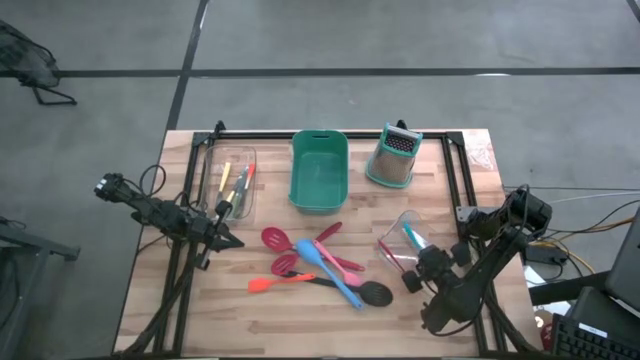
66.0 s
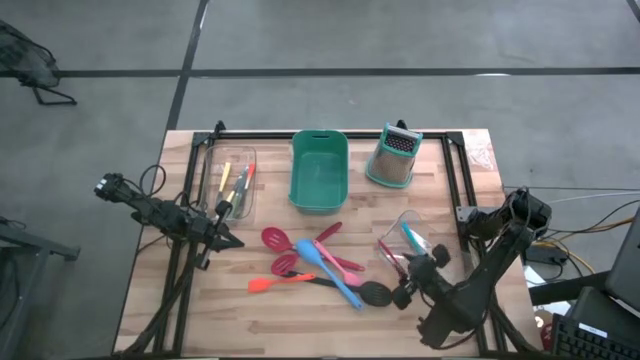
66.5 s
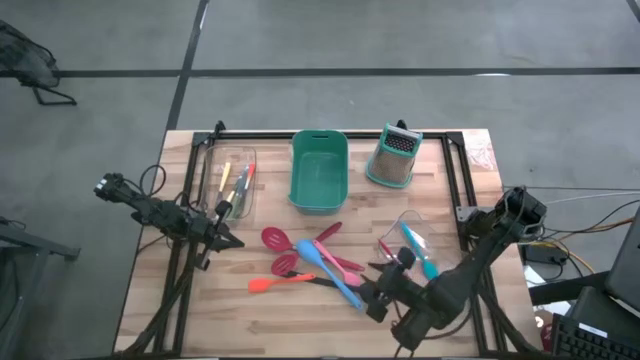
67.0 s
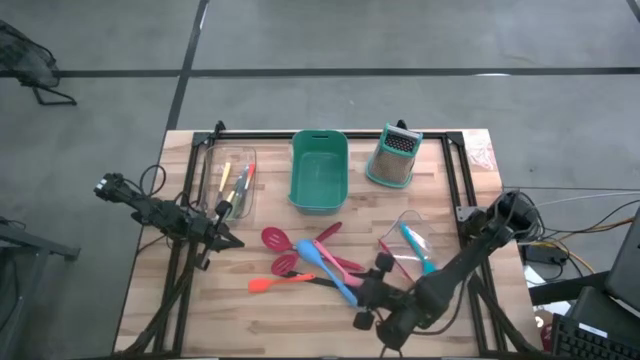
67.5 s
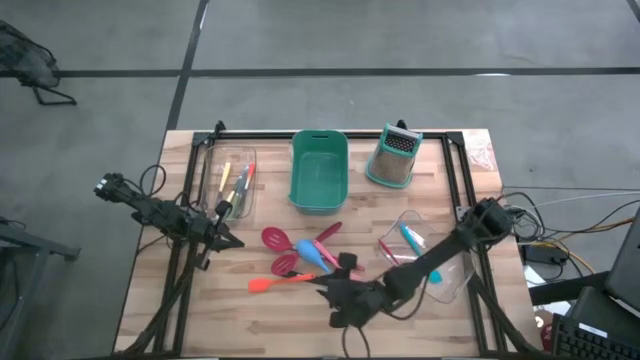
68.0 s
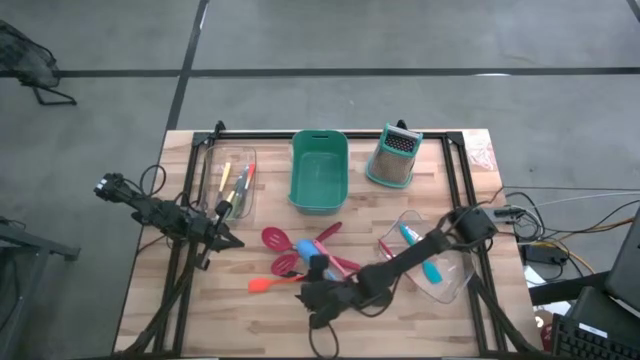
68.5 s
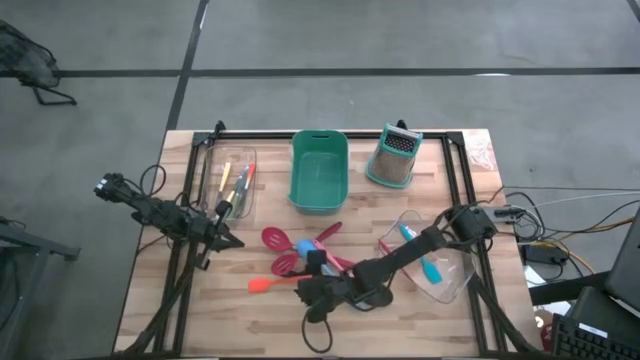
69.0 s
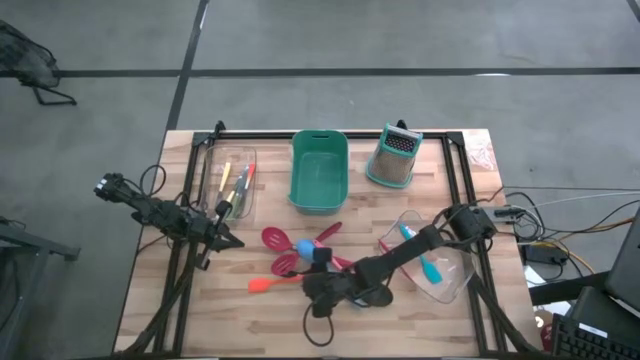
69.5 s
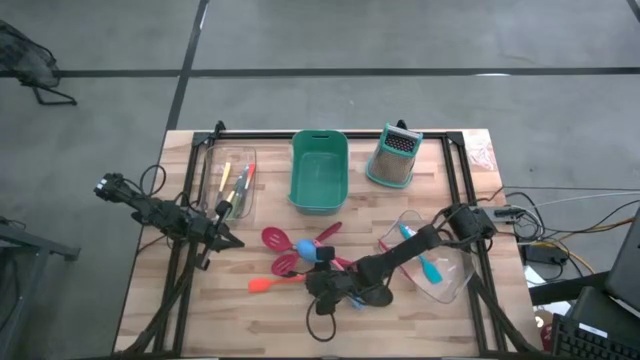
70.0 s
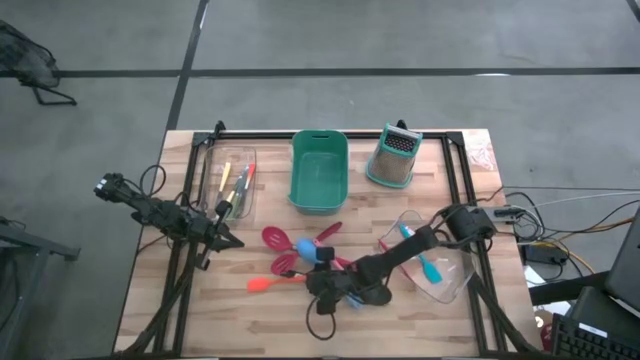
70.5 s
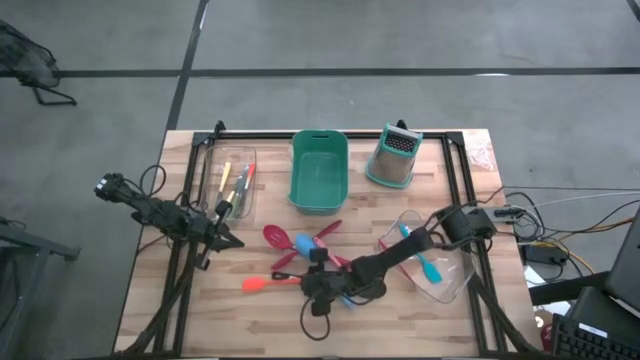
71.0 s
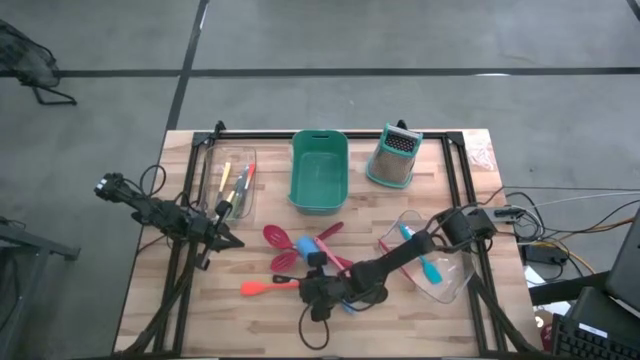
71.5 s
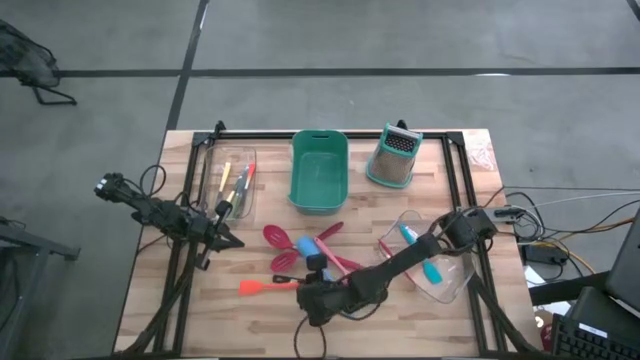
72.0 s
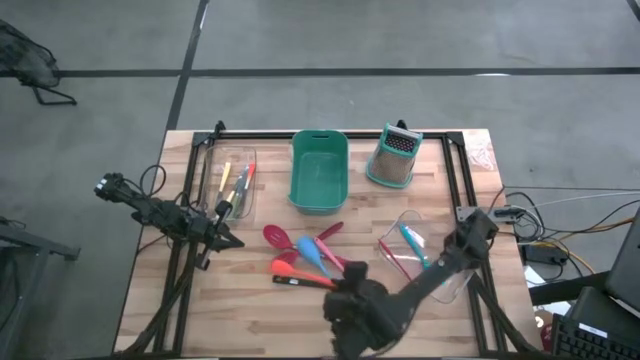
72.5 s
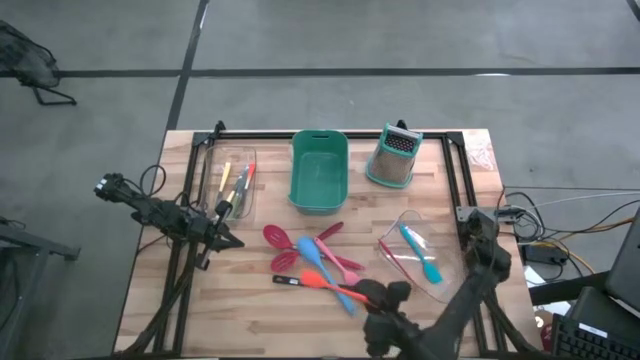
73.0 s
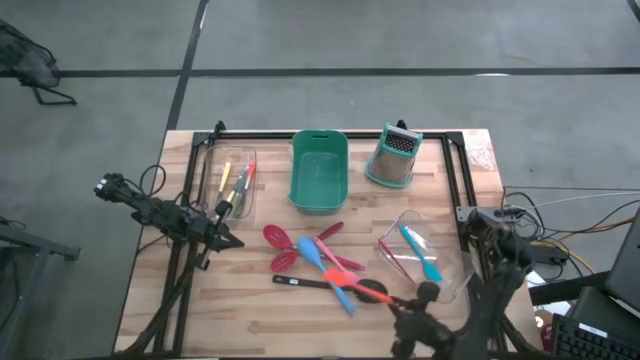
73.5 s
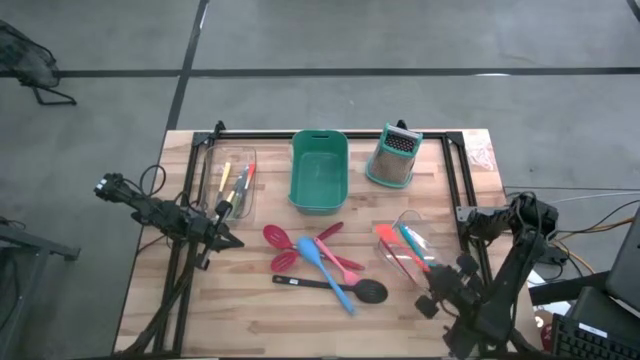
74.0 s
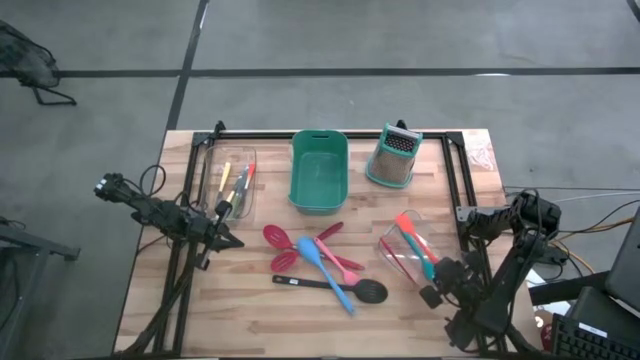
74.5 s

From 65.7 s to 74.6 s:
Task: Pick & Place Kitchen Items
Put the orange spatula into the bottom transparent bin

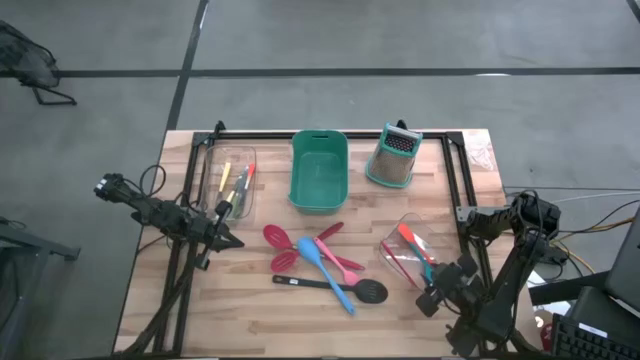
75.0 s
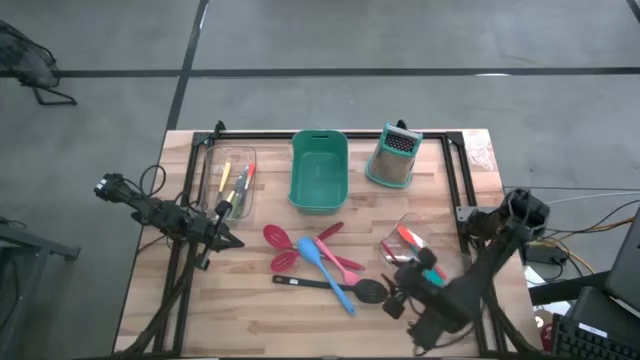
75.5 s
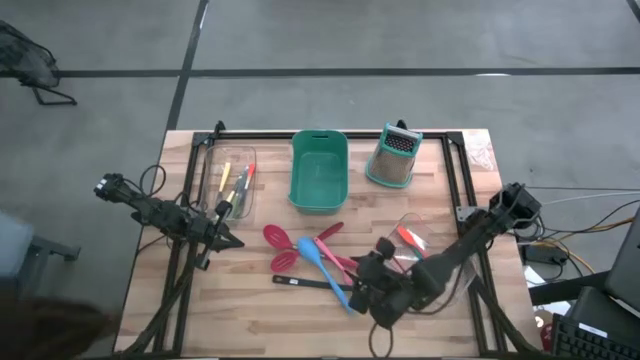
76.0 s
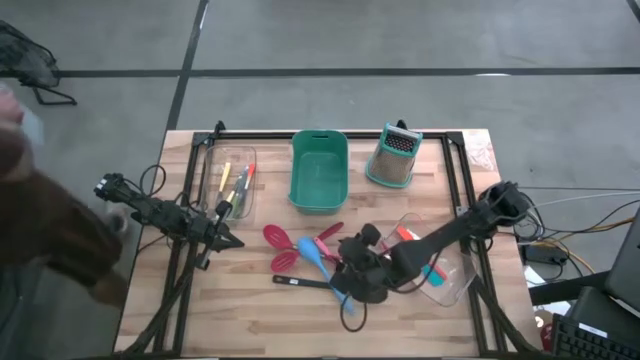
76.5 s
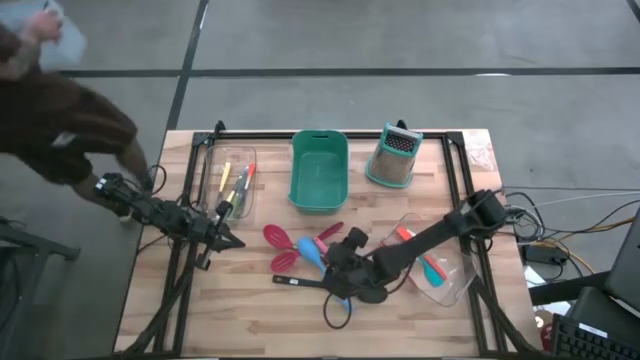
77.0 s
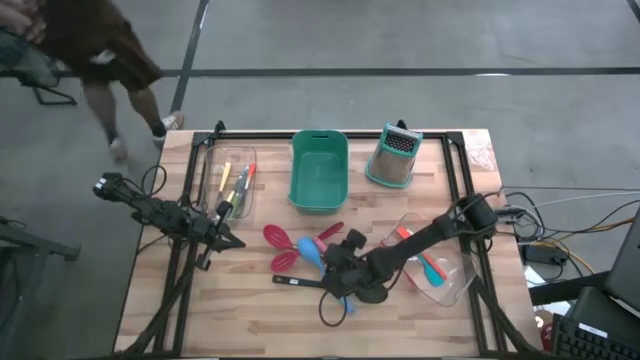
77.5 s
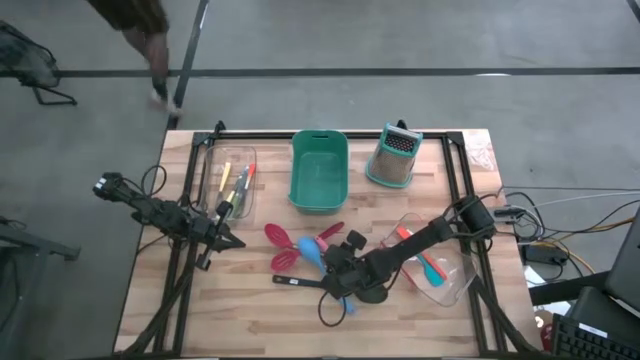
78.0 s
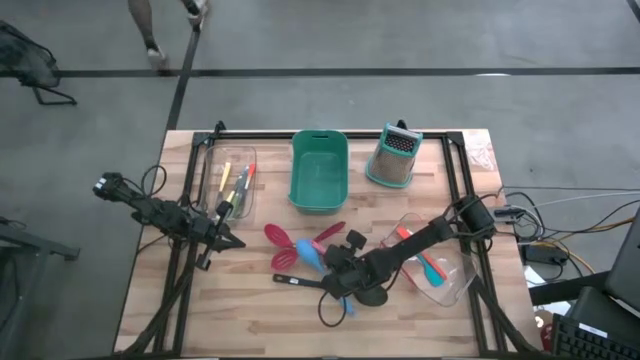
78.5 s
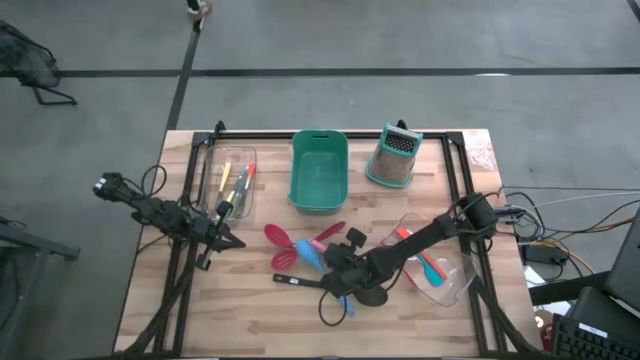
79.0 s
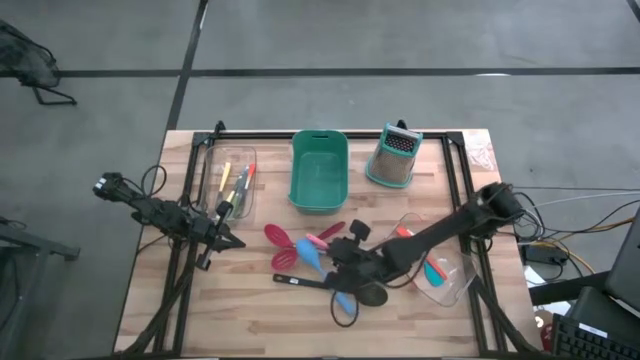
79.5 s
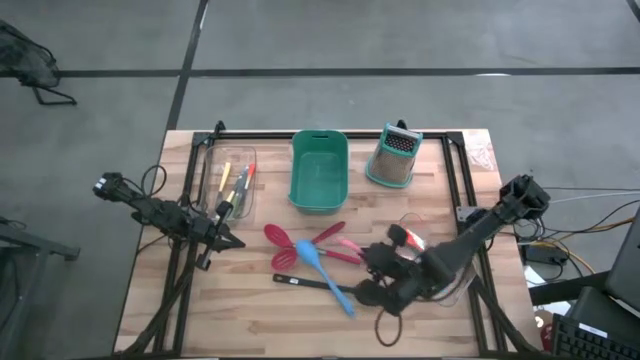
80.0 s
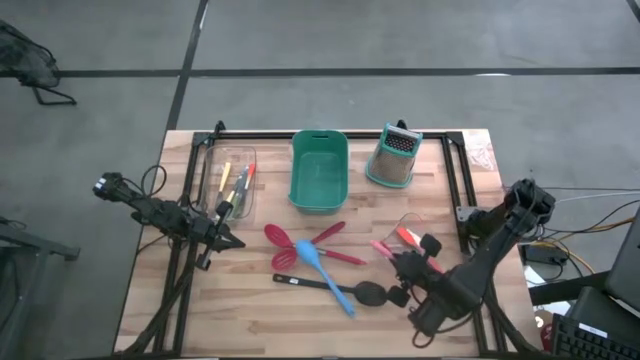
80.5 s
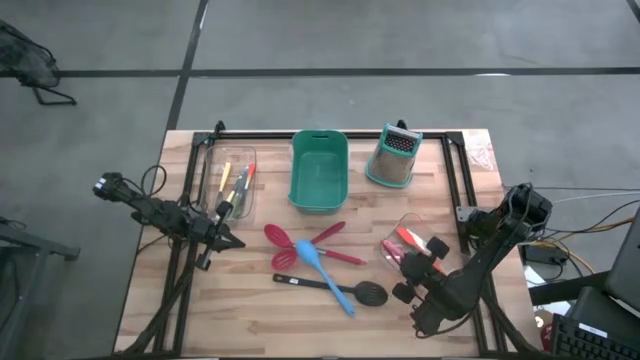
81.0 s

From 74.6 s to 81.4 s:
Put the pink spatula into the bottom transparent bin

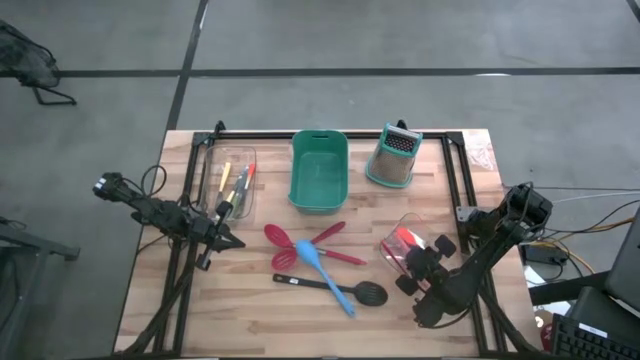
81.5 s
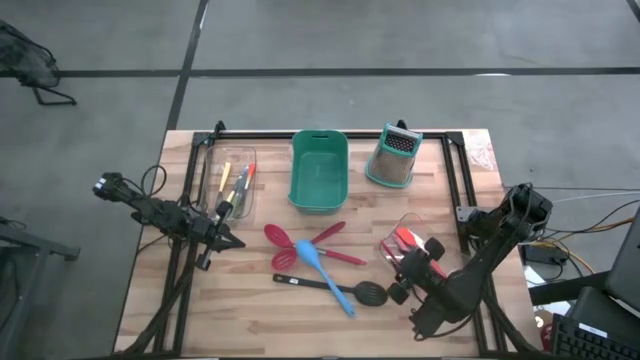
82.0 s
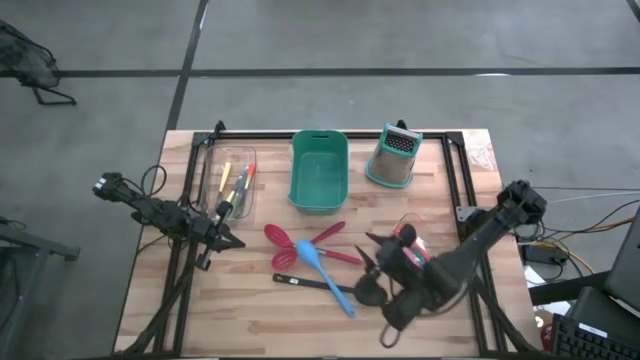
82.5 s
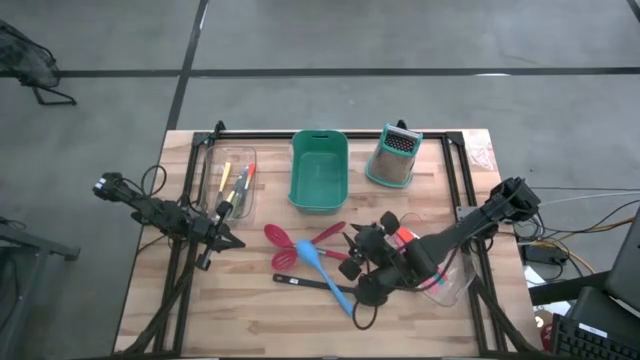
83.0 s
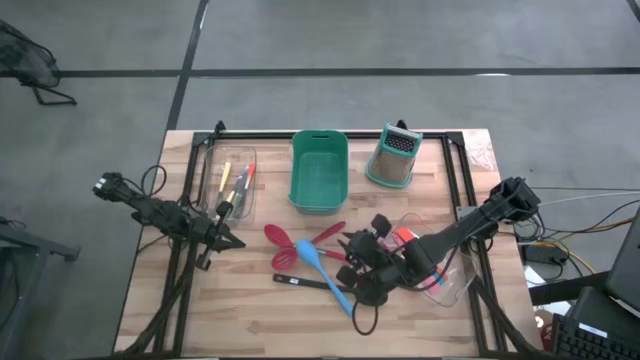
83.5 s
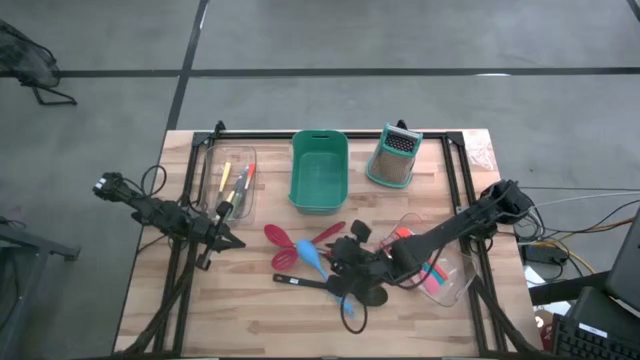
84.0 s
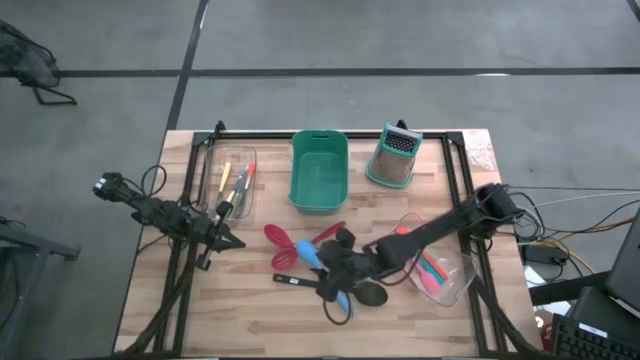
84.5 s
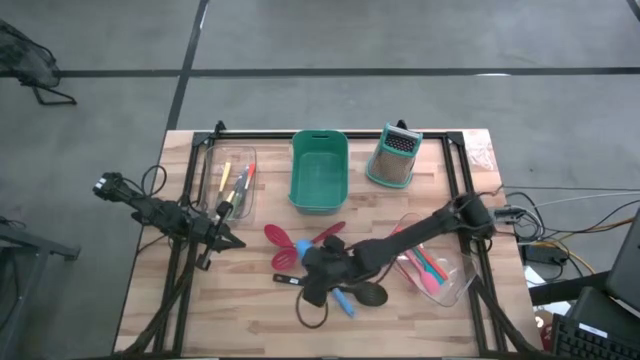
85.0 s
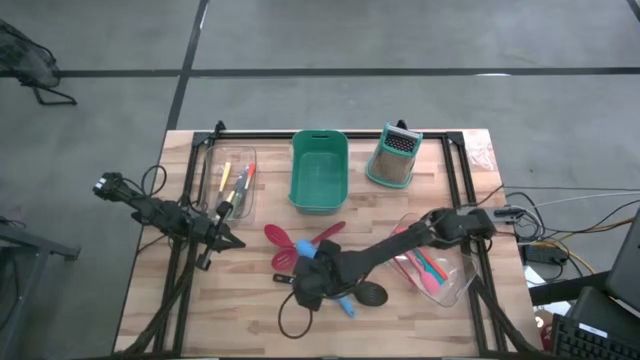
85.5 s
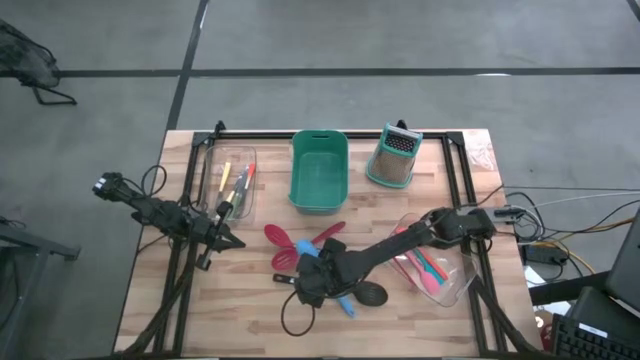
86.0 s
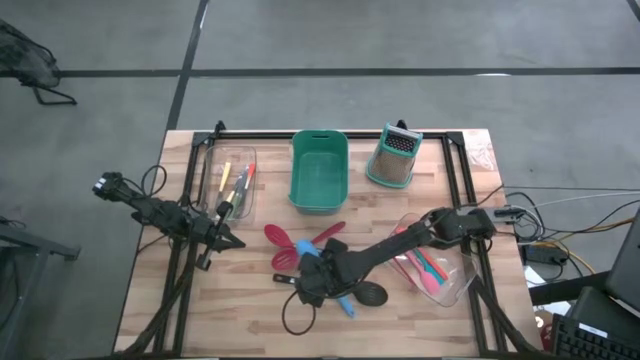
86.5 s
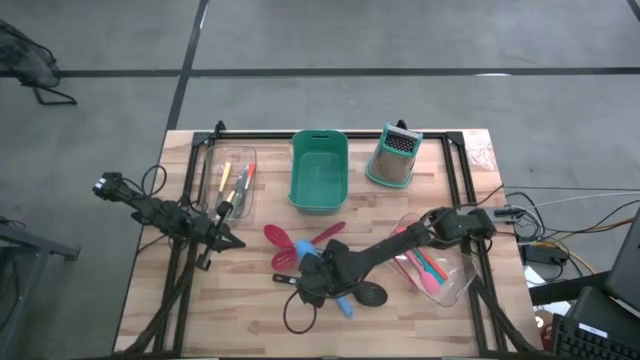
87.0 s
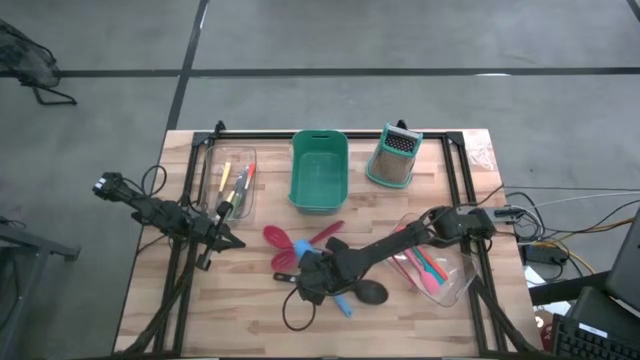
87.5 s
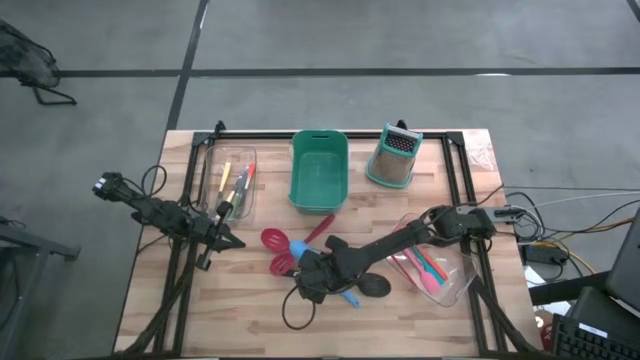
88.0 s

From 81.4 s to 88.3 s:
Put the blue serving spoon into the green bin
